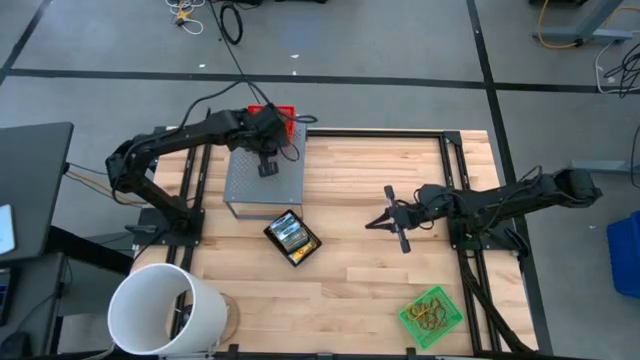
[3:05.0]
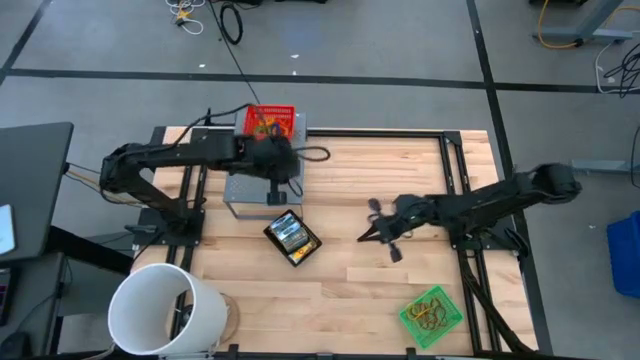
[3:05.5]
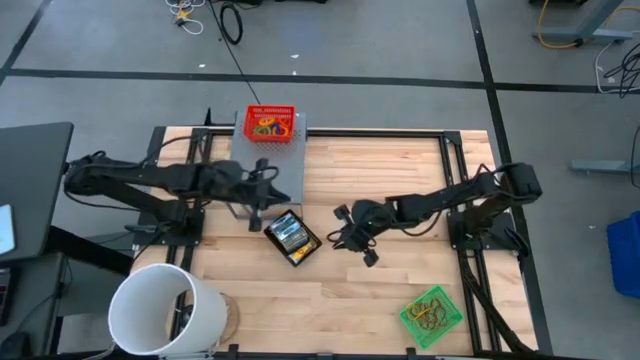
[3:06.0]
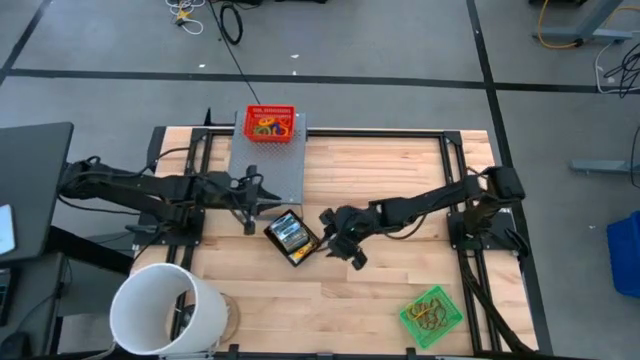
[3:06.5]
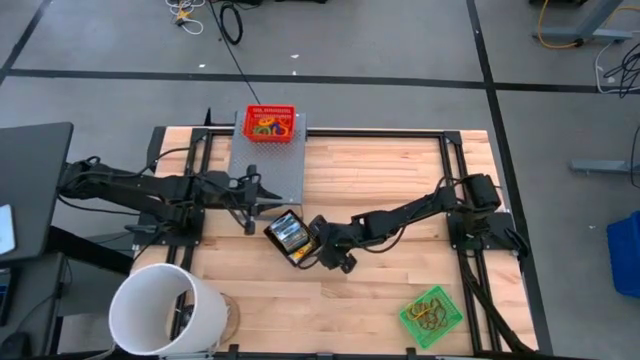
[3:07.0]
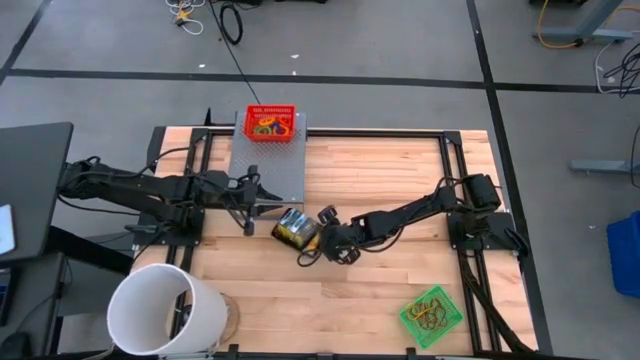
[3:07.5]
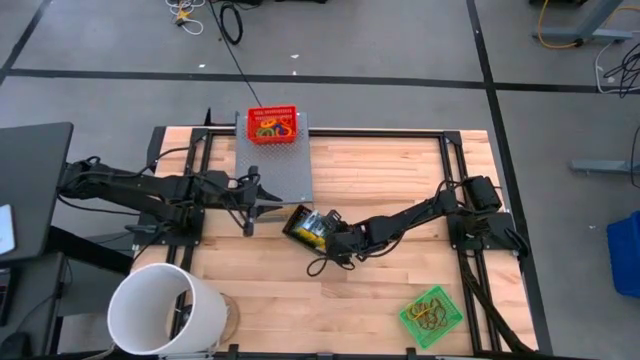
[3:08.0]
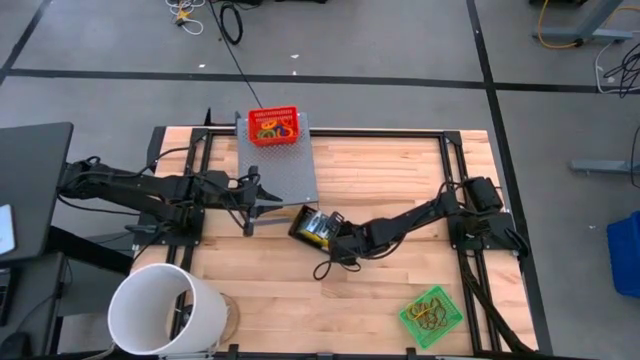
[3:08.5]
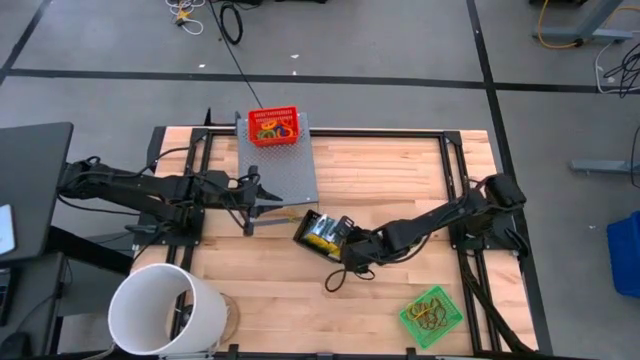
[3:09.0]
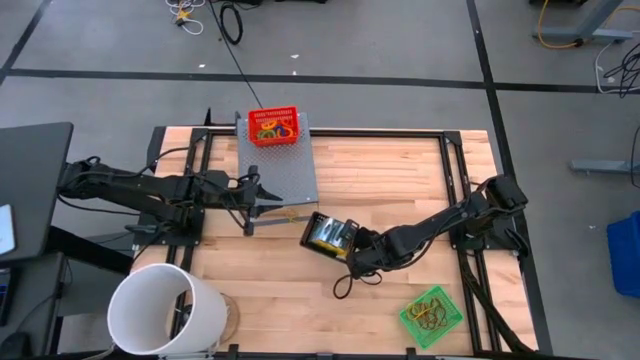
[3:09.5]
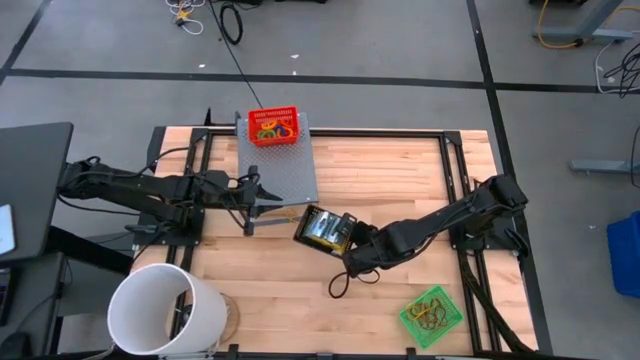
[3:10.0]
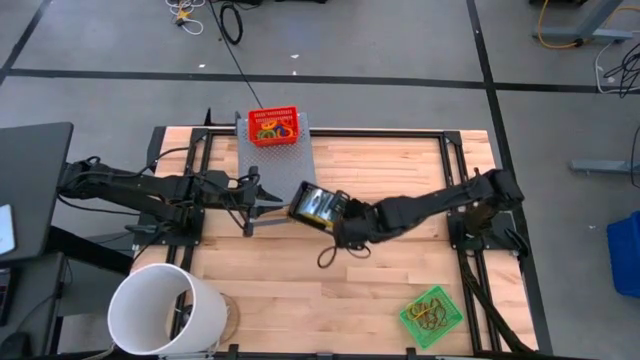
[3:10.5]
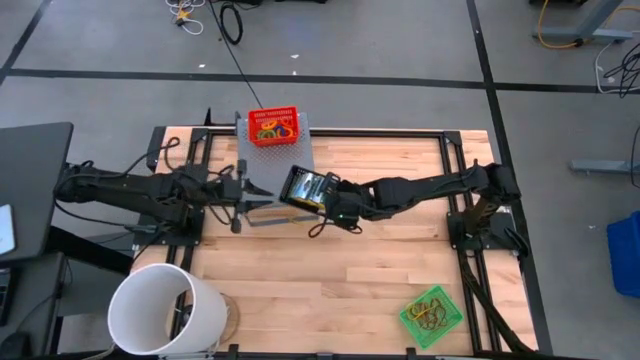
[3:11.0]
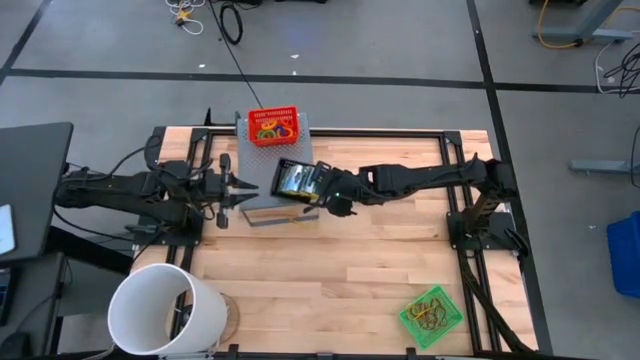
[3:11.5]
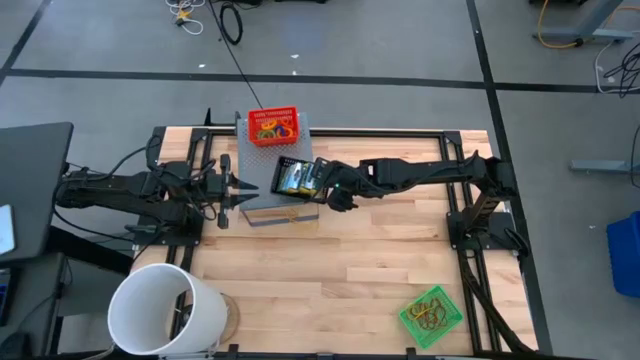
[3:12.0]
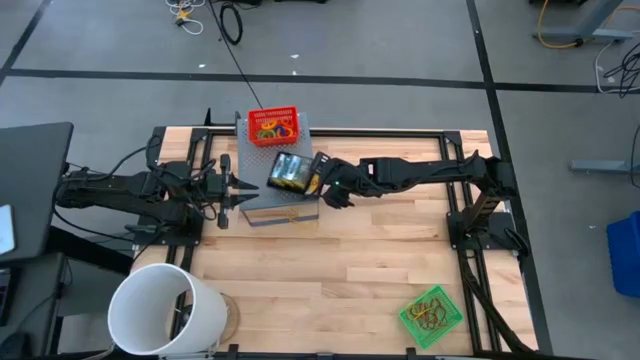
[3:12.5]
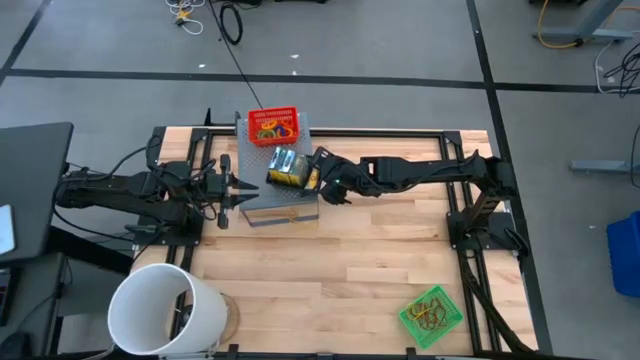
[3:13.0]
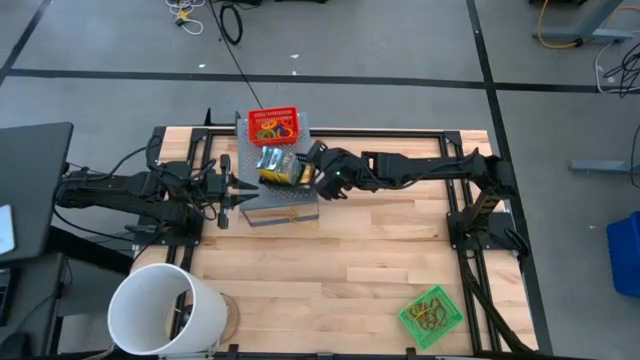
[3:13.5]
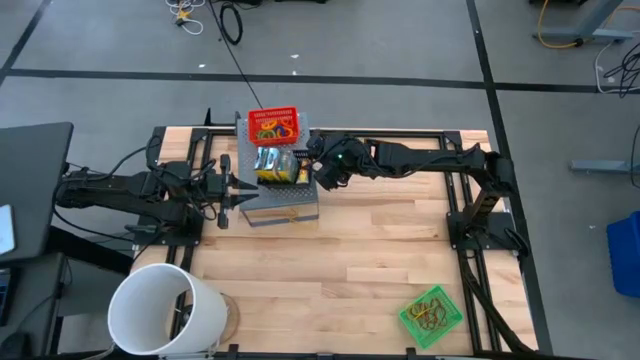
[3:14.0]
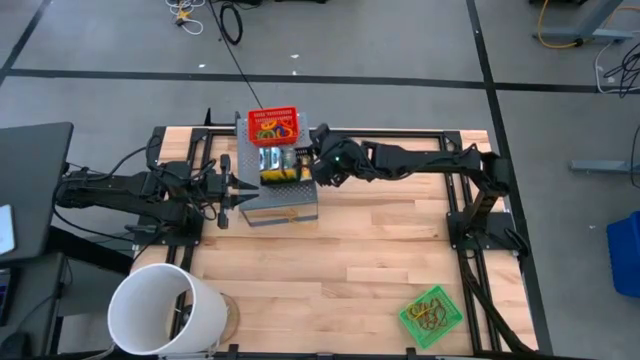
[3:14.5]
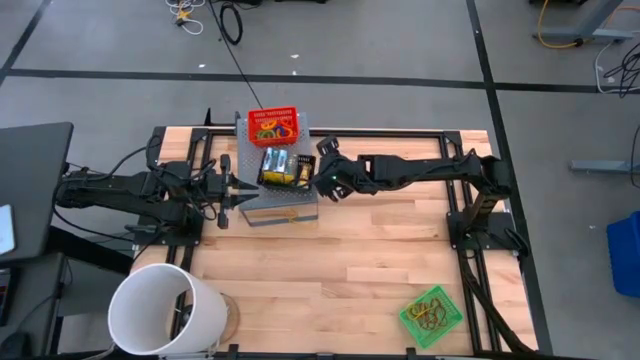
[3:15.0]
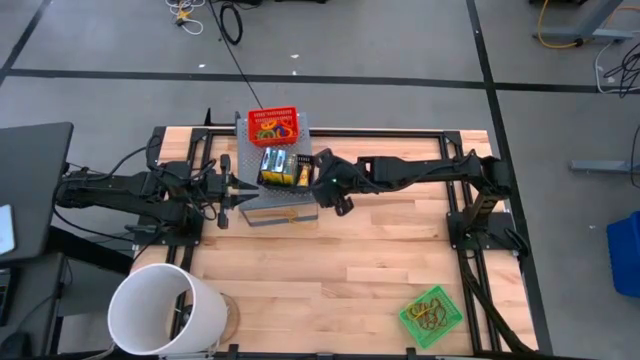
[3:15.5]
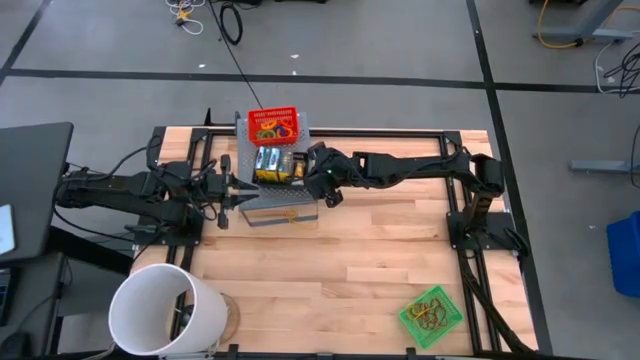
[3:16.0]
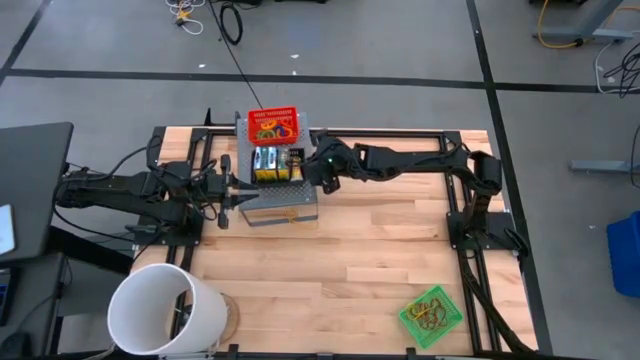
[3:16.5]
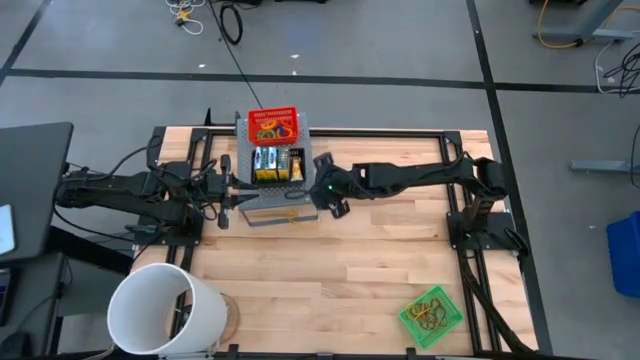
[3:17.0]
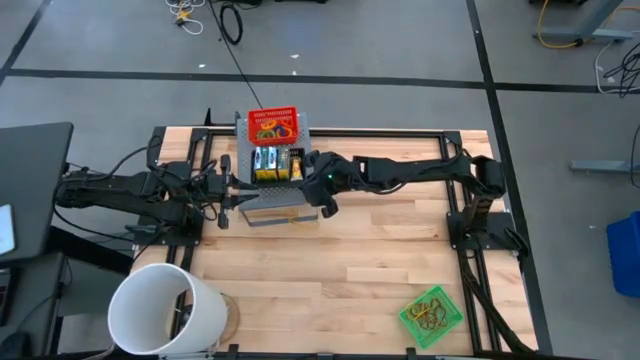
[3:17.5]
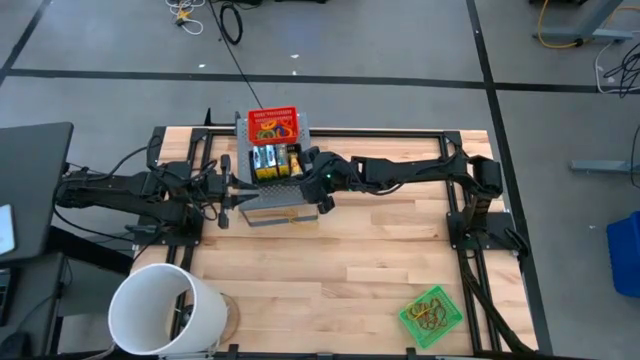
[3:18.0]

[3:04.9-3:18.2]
Task: Pick & Place Office Desk Supplies
Put the black basket with the crayon boxes on the shelf

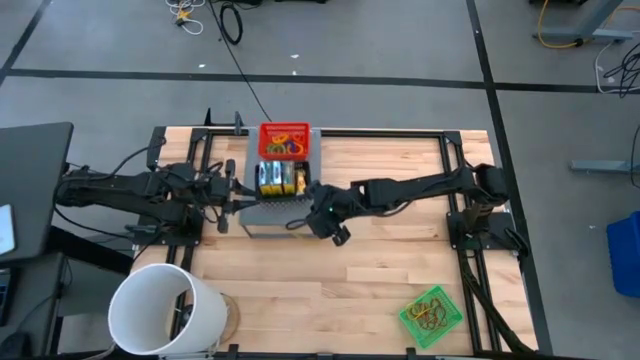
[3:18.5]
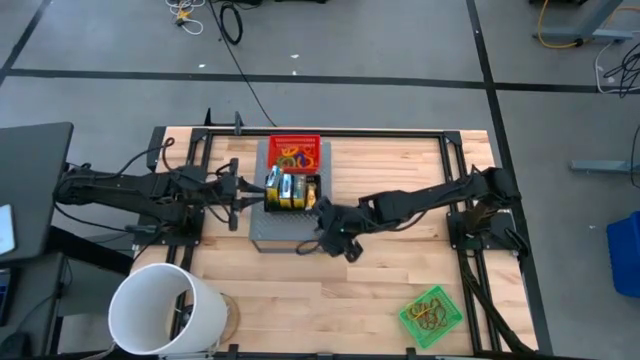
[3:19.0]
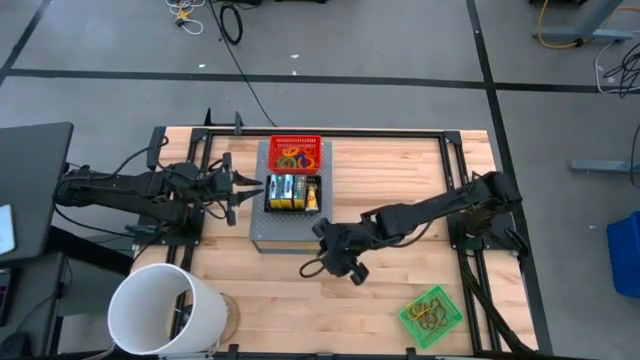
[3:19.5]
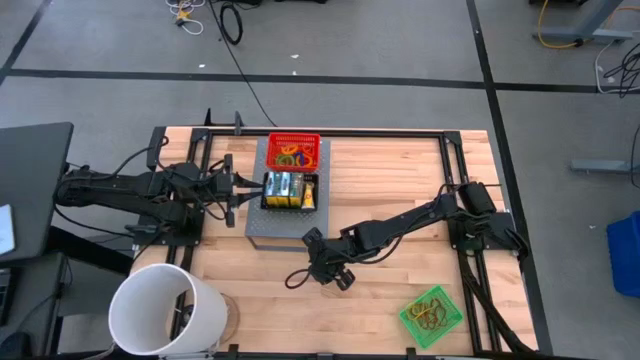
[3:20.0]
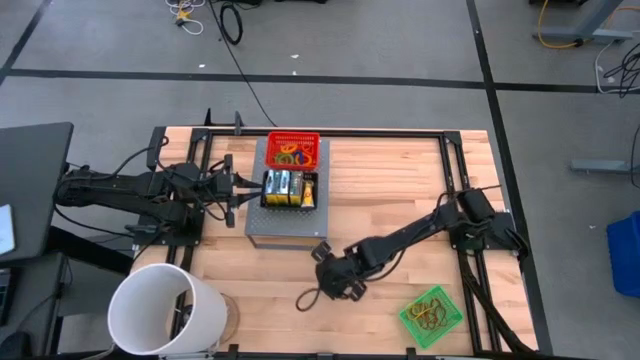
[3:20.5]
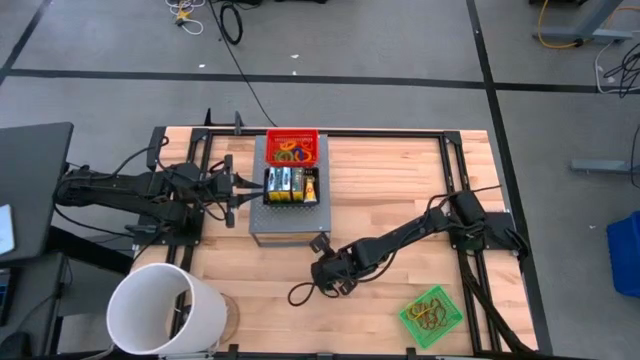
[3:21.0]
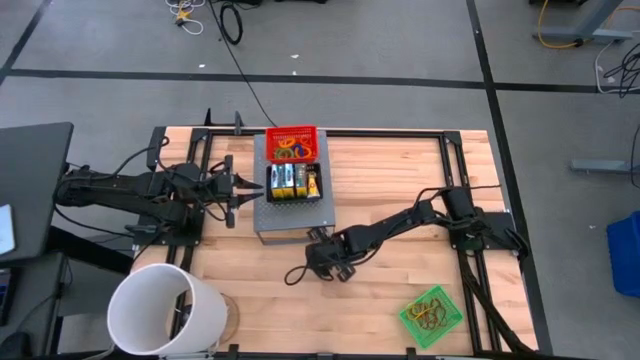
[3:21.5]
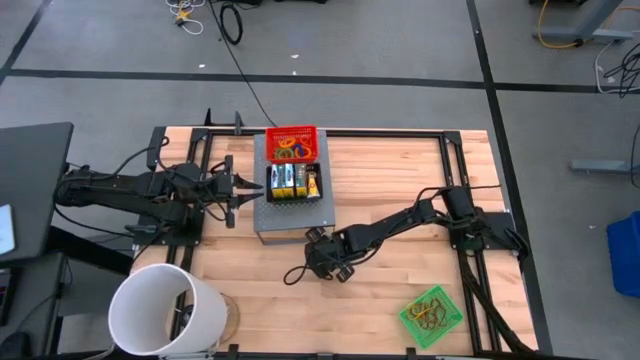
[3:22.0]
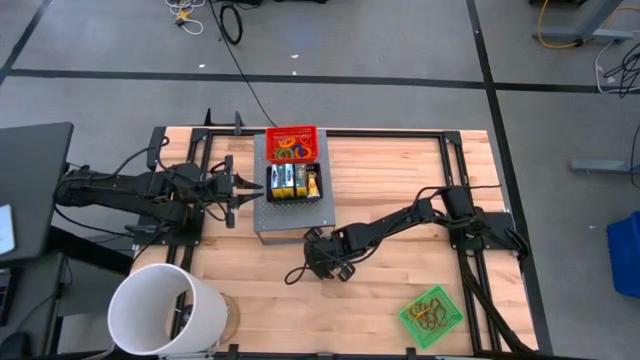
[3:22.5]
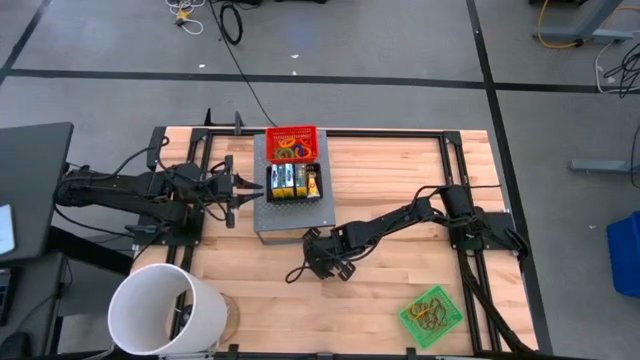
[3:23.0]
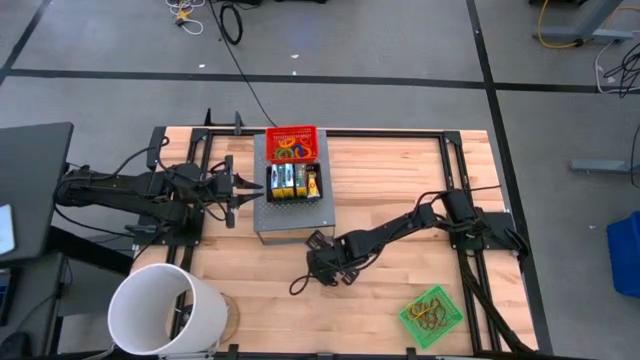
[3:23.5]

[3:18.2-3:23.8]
Put the yellow rubber band into the green basket

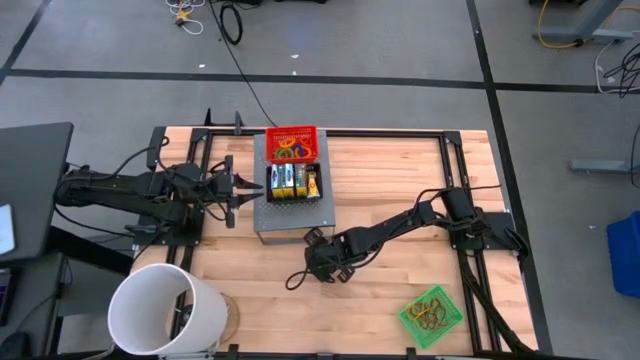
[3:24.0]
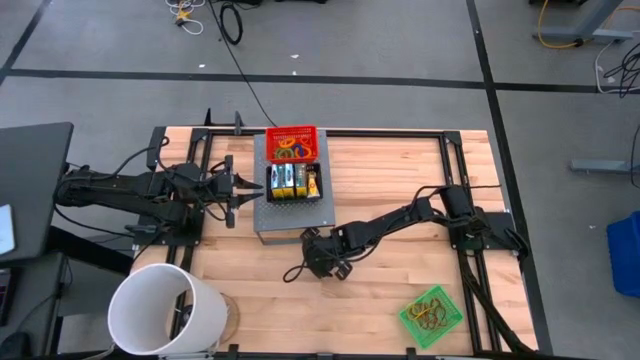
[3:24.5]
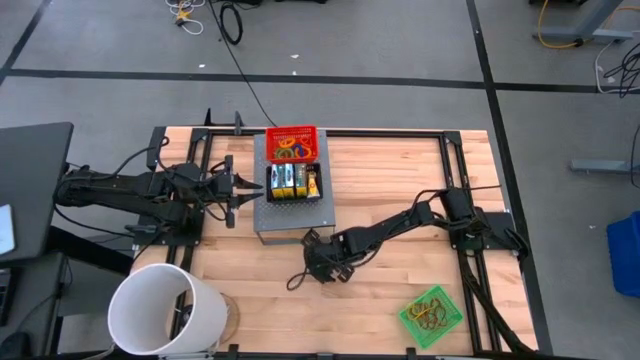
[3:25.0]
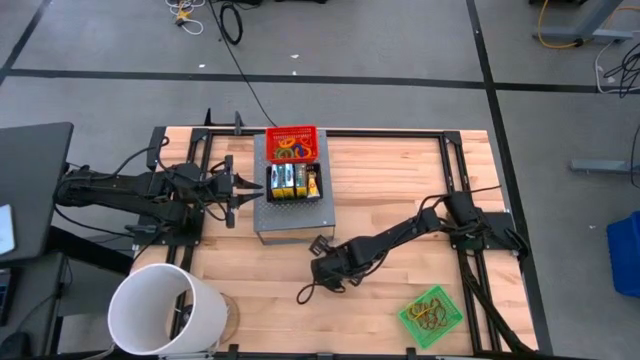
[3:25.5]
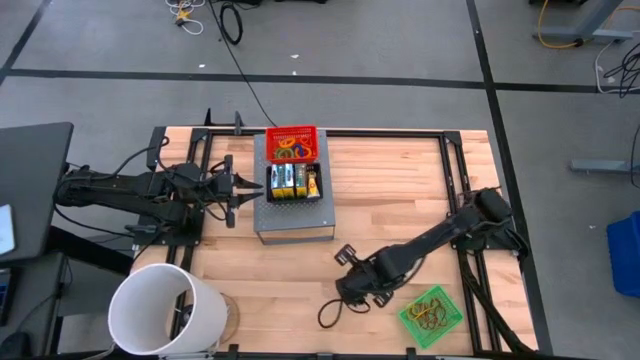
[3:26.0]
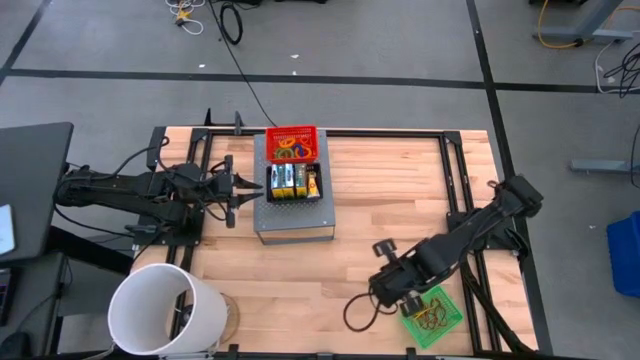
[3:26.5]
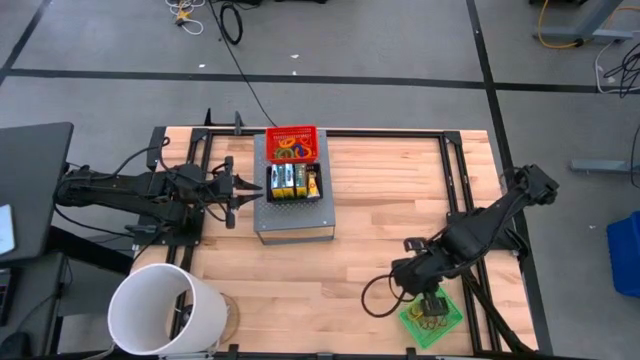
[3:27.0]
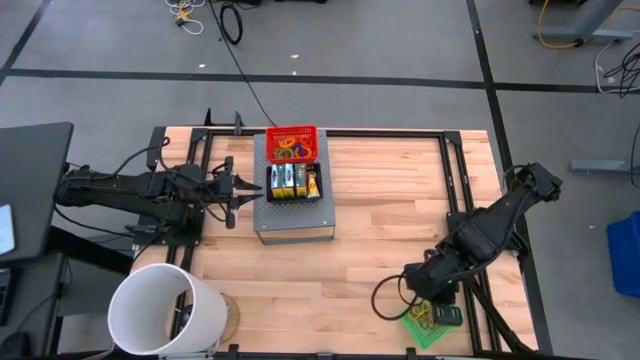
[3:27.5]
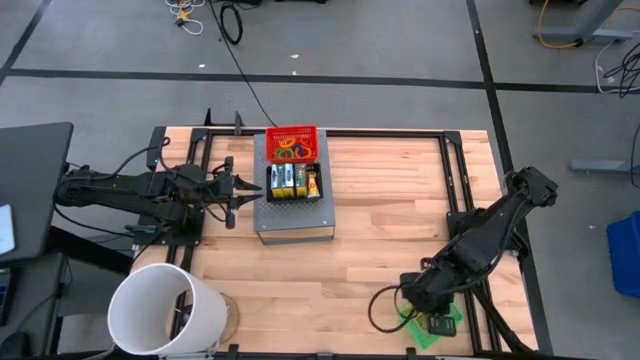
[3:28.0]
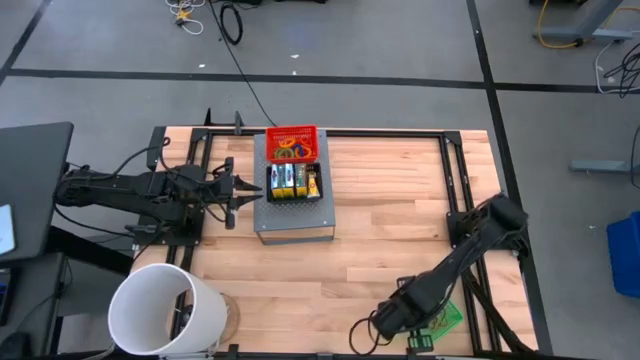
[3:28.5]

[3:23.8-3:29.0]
Put the yellow rubber band into the green basket
